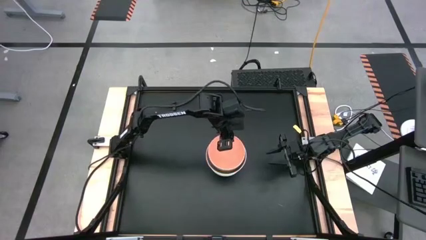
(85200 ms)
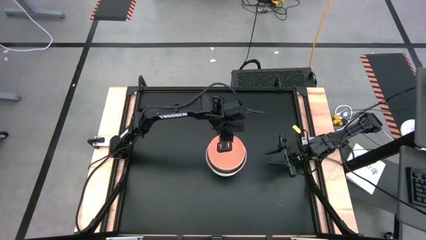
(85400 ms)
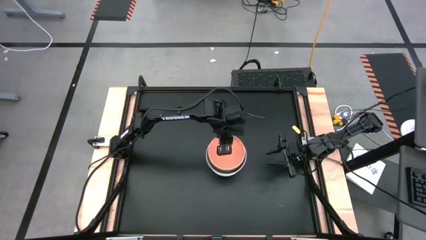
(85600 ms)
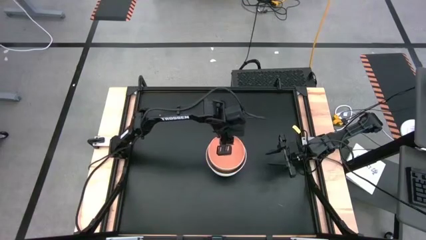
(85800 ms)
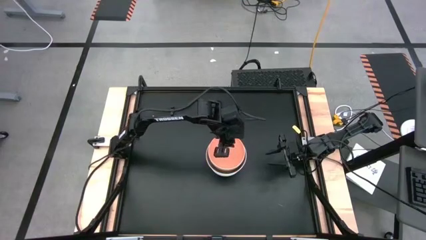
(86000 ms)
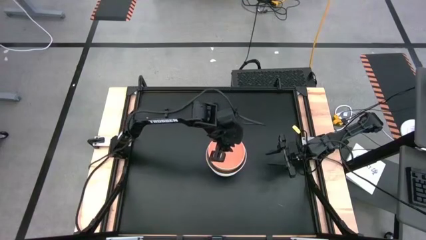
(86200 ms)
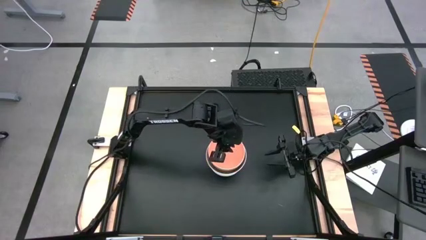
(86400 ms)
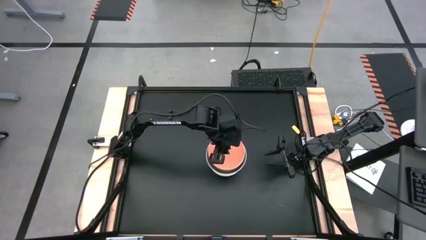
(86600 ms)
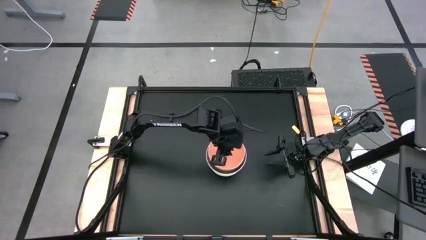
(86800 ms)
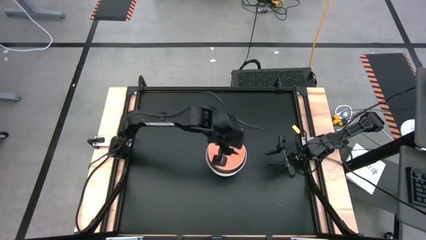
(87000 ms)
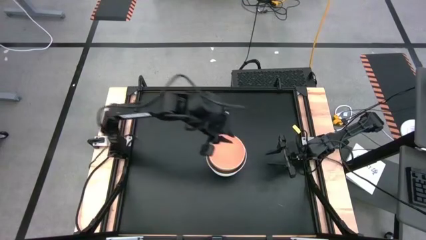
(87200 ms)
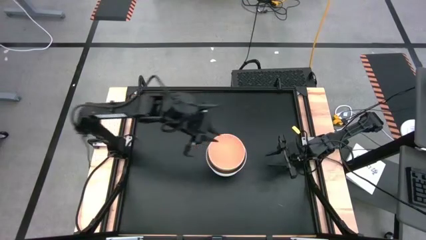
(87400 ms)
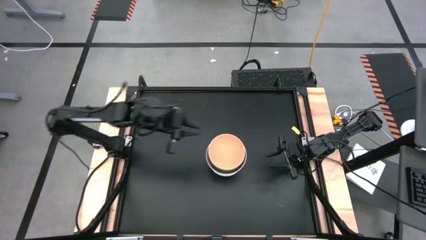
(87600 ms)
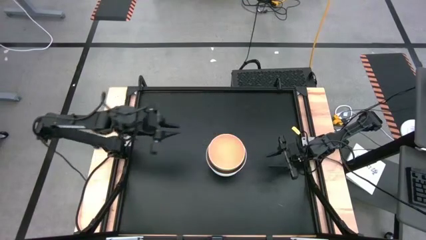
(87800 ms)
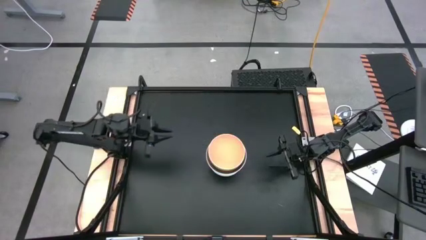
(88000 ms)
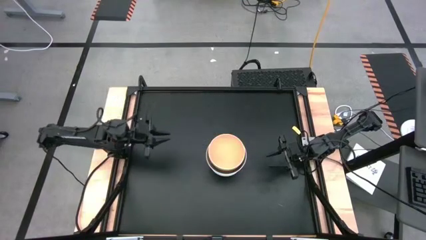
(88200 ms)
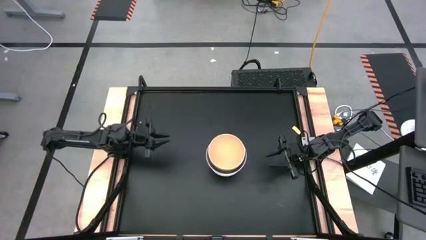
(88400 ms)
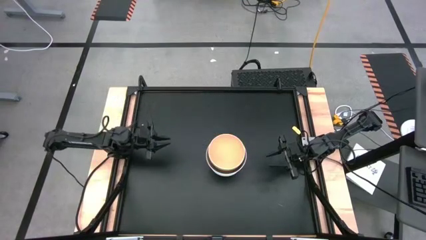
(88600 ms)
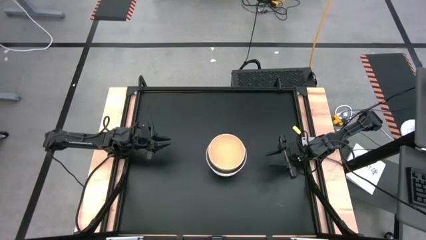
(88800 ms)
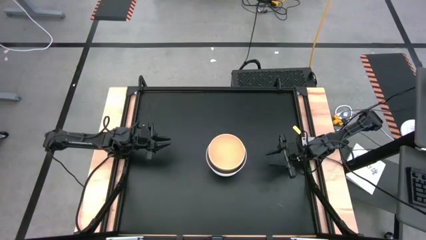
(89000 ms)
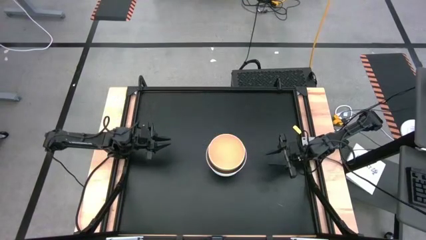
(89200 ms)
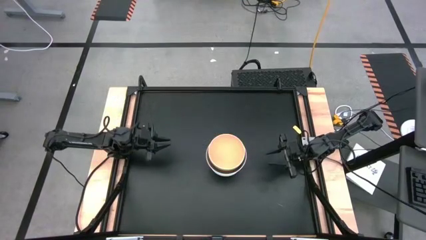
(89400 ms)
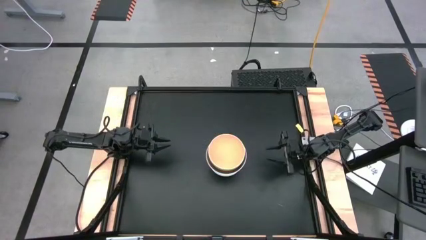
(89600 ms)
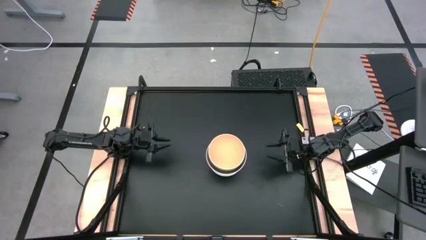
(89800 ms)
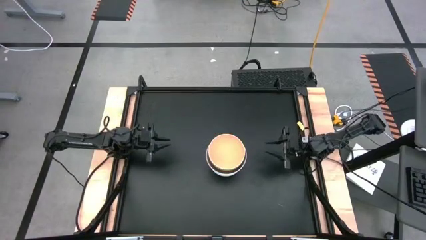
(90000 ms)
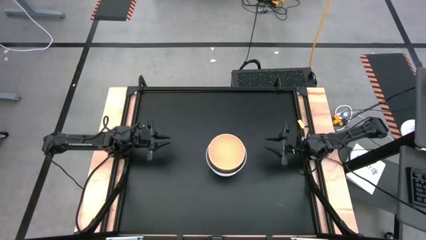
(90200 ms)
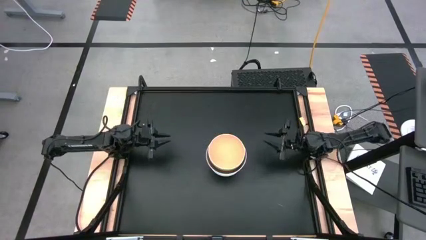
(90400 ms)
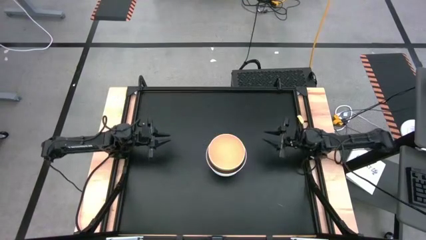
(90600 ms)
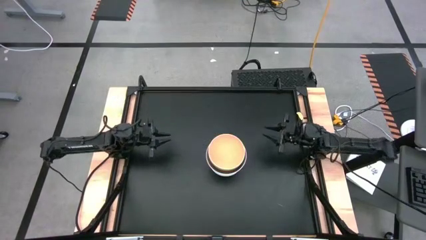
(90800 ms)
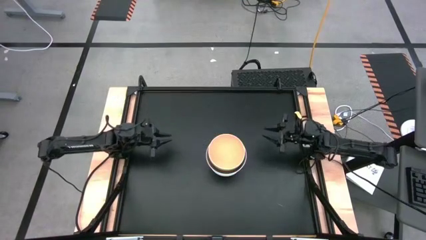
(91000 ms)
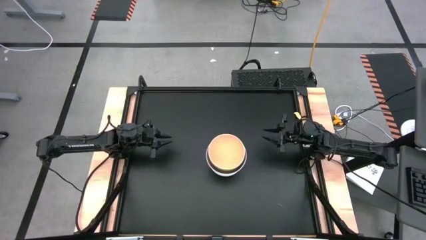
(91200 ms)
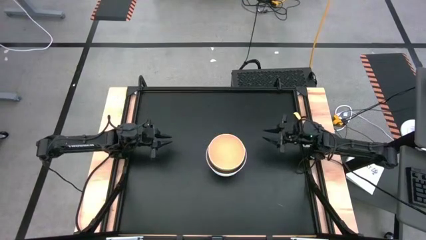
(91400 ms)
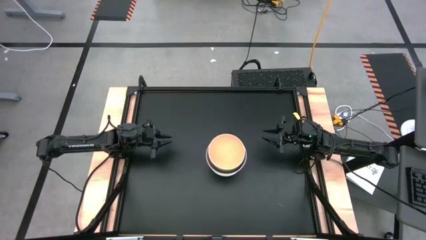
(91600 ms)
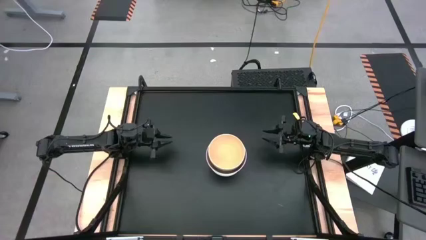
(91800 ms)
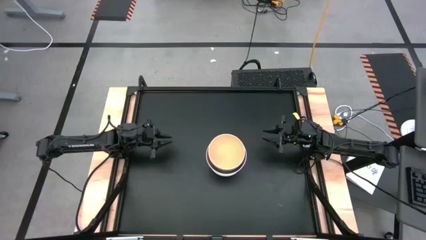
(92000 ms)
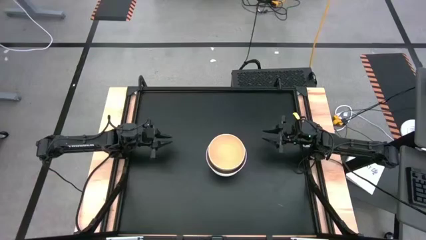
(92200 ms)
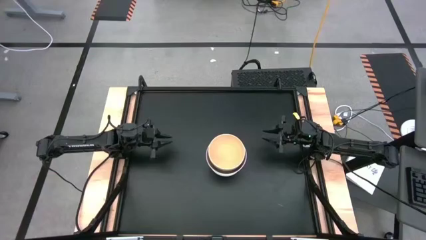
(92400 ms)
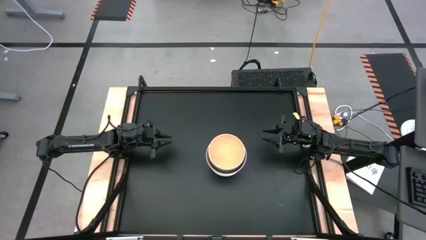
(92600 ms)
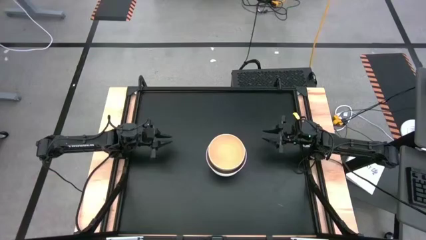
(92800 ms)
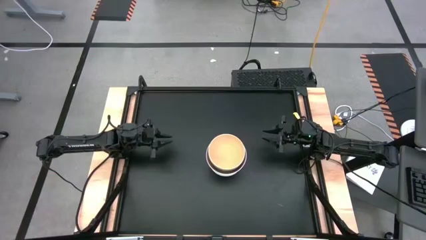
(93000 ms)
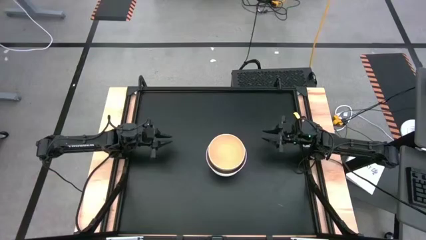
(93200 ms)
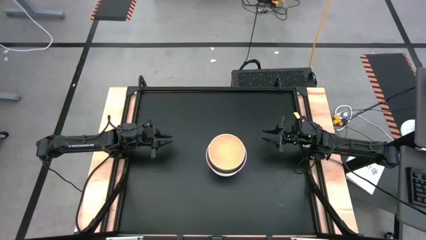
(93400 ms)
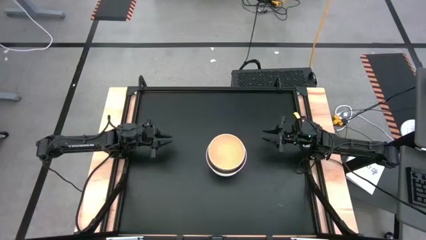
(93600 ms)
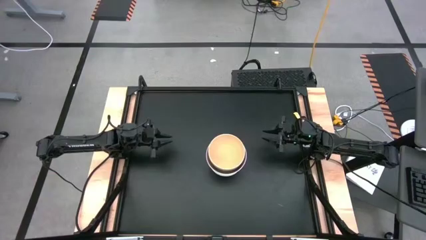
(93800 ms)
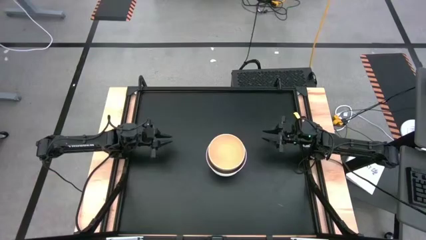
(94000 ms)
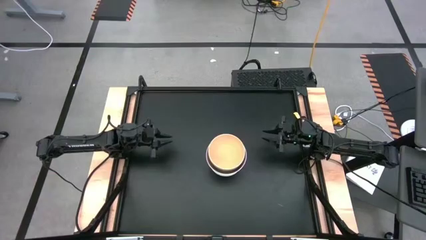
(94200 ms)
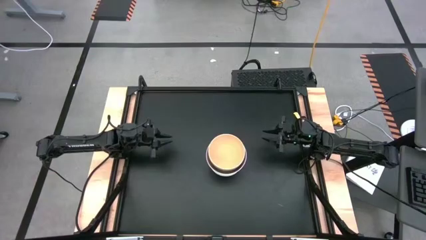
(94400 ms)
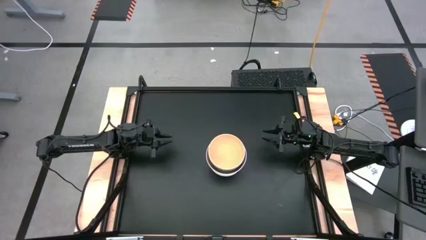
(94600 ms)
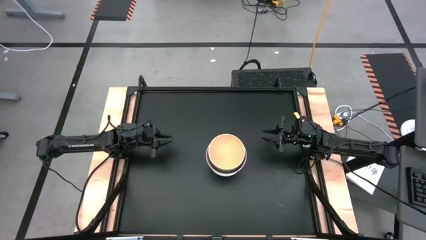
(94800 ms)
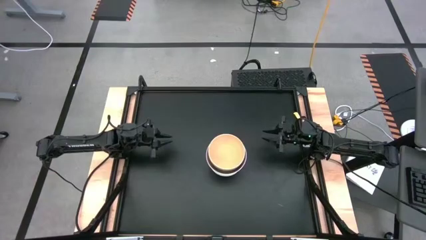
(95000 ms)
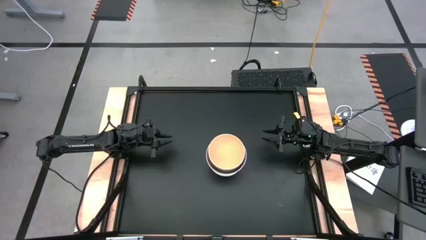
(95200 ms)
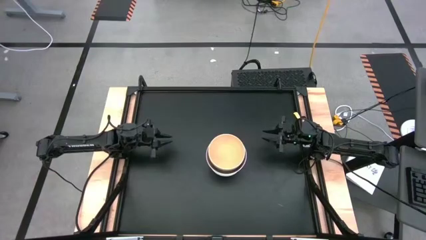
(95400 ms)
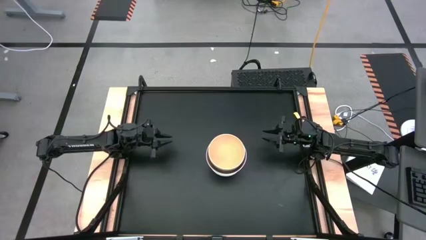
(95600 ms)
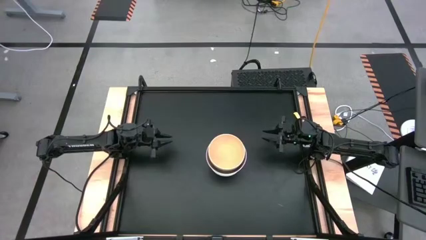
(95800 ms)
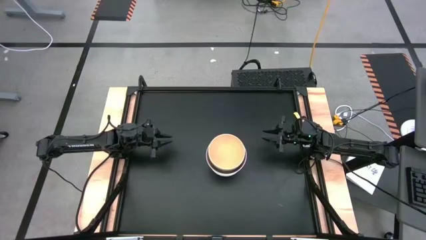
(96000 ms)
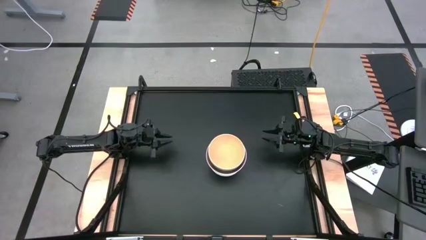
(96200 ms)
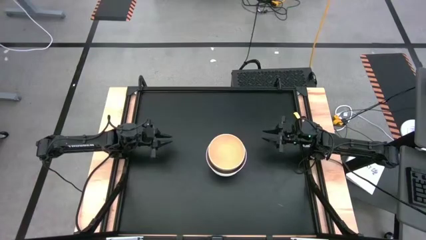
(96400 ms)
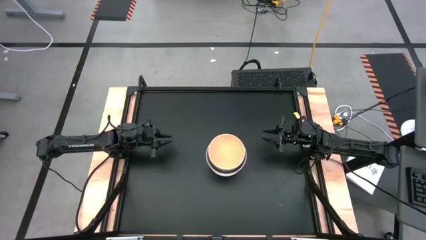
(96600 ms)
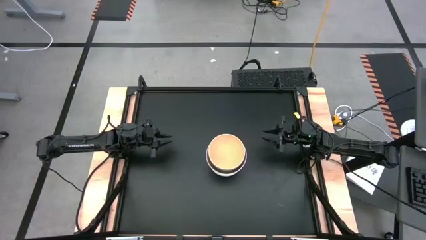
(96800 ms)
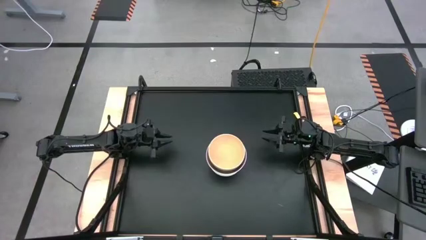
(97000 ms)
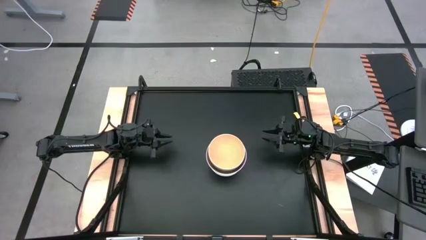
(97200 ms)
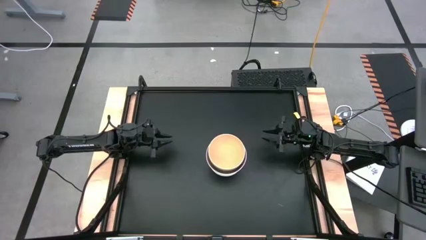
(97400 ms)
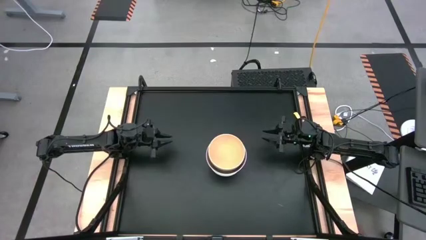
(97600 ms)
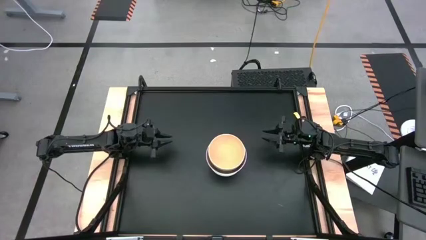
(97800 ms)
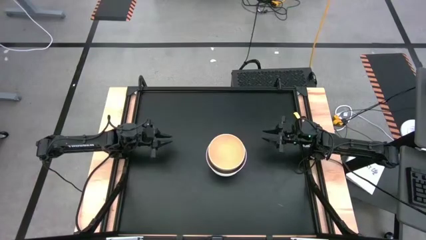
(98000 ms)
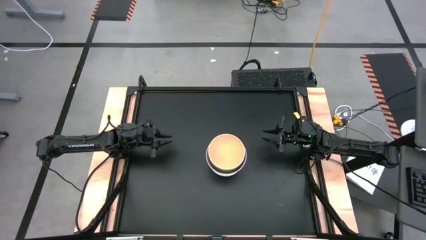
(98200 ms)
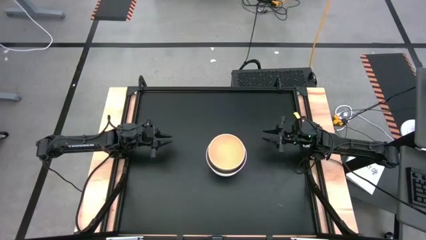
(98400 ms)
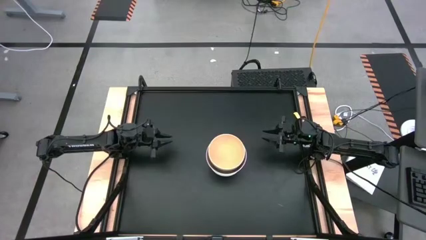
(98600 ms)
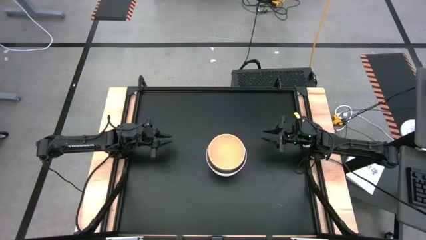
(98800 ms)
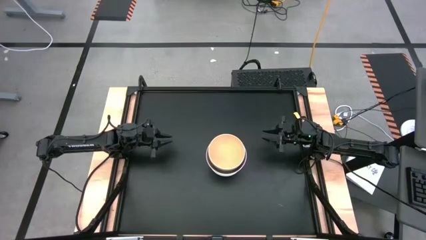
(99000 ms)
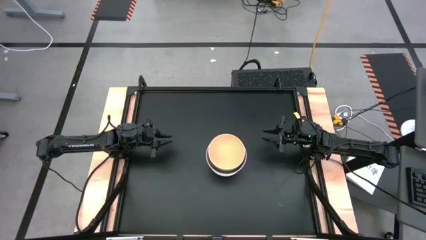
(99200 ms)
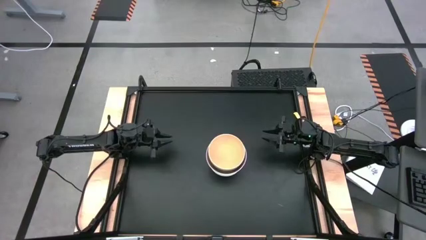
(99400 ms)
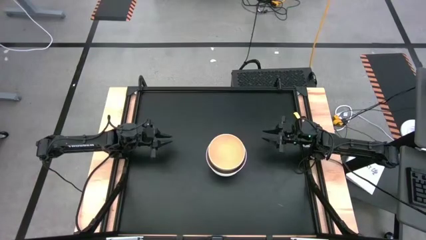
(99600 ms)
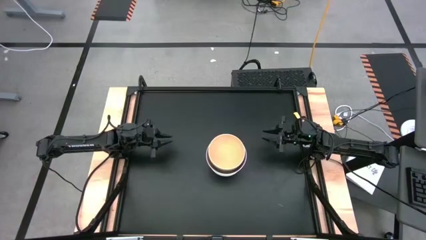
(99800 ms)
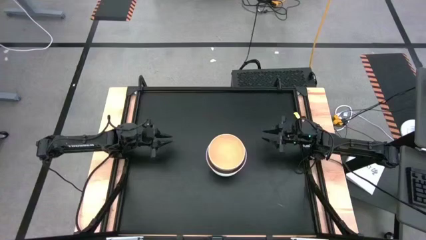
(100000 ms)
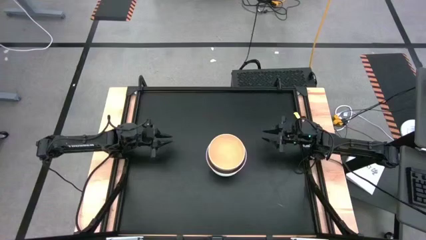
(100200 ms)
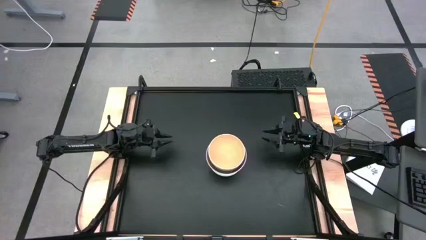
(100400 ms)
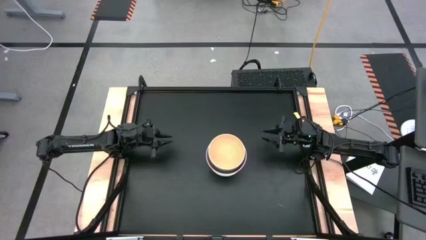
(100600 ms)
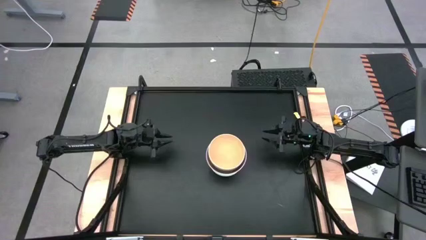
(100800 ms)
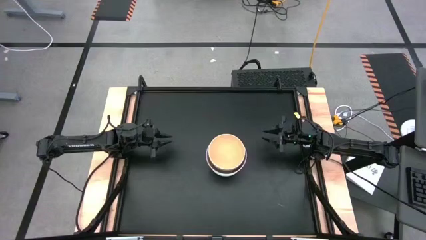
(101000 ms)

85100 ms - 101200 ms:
Task: Nest bowls inside each other
Return to Home Position
